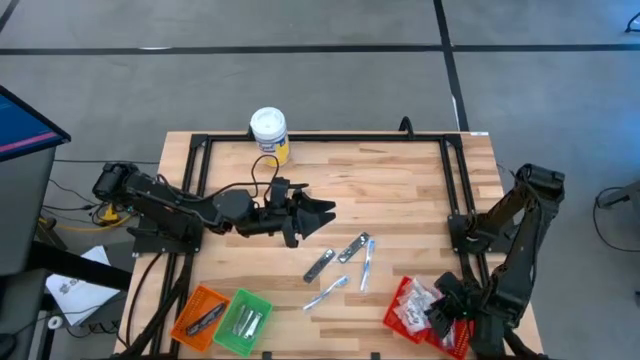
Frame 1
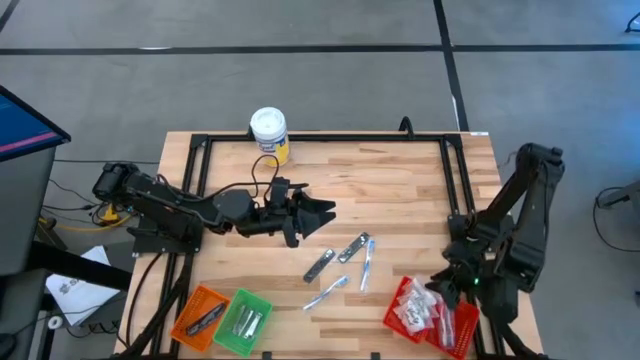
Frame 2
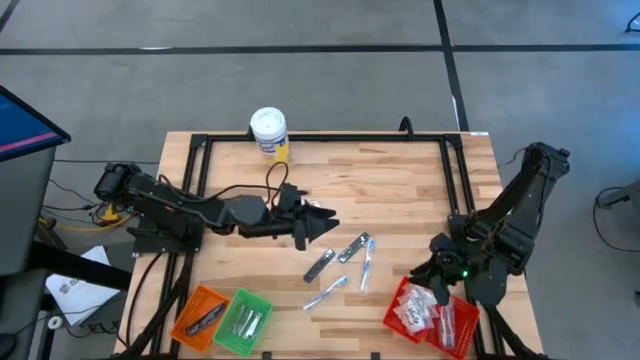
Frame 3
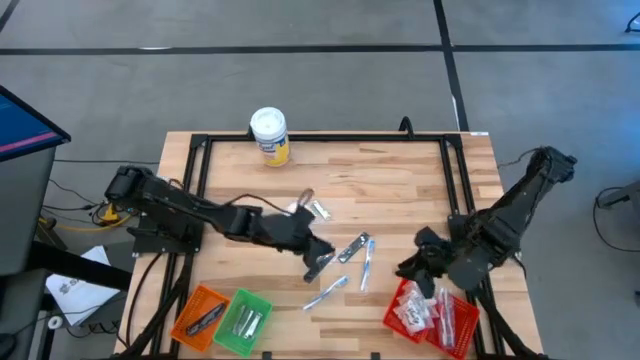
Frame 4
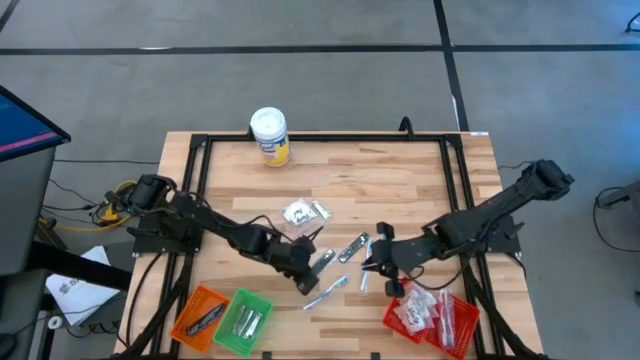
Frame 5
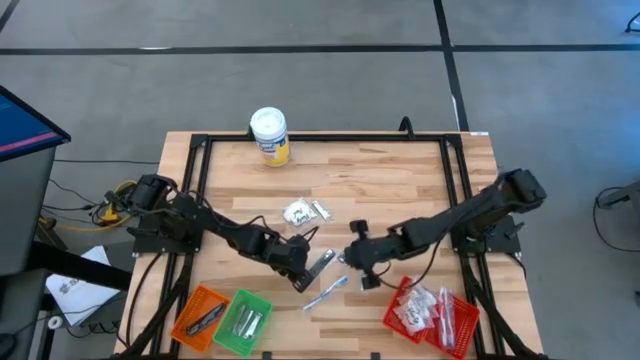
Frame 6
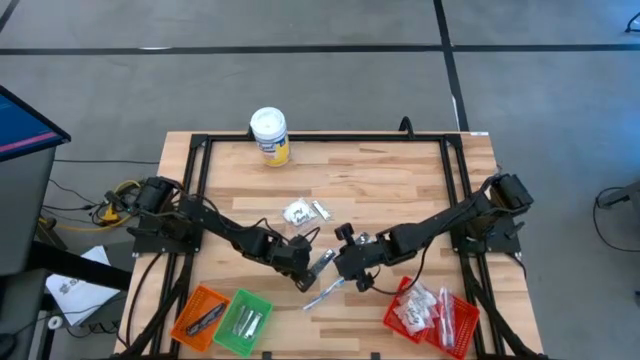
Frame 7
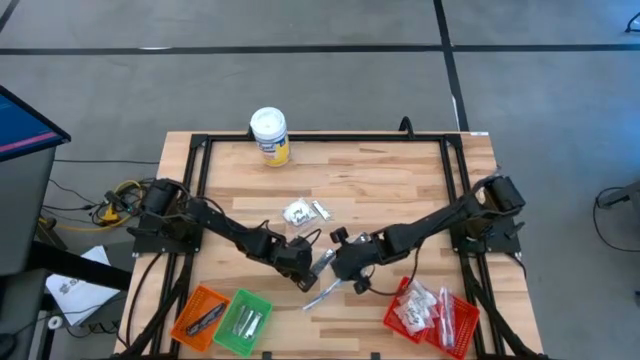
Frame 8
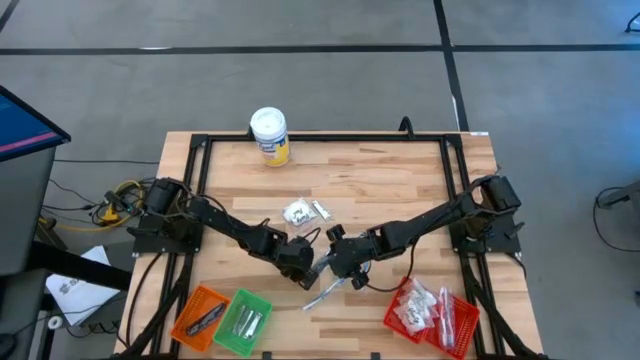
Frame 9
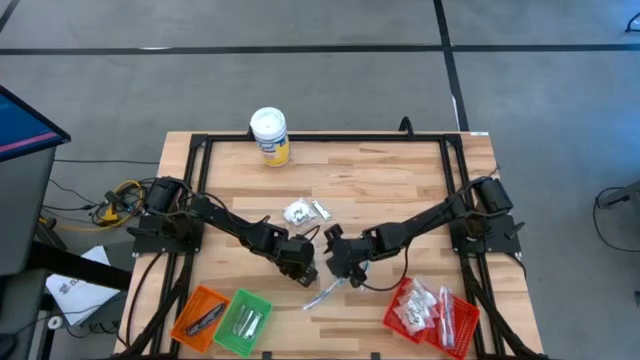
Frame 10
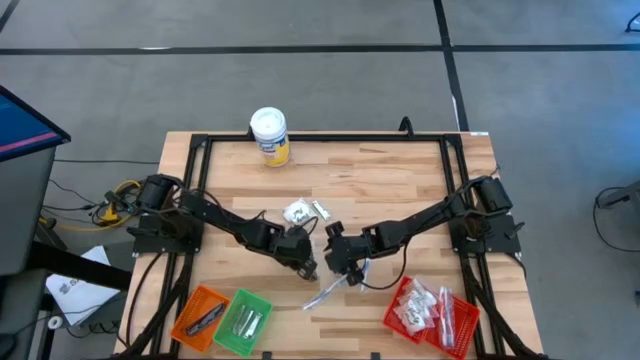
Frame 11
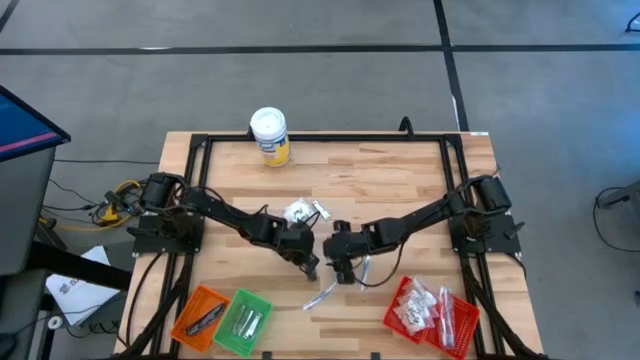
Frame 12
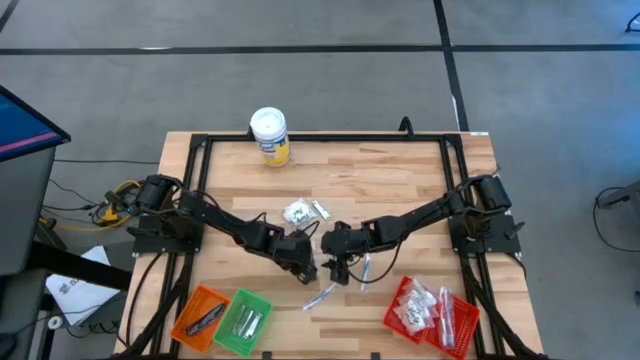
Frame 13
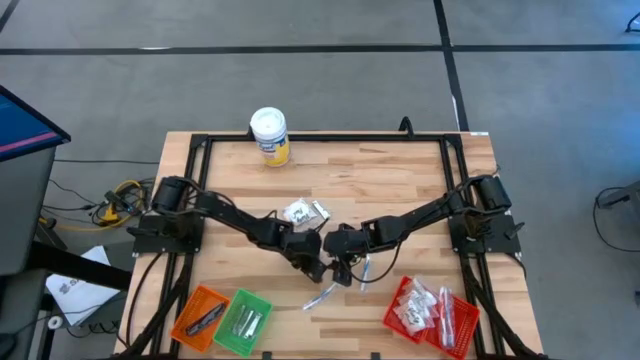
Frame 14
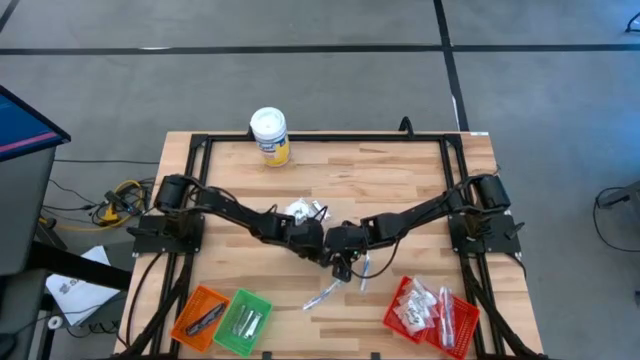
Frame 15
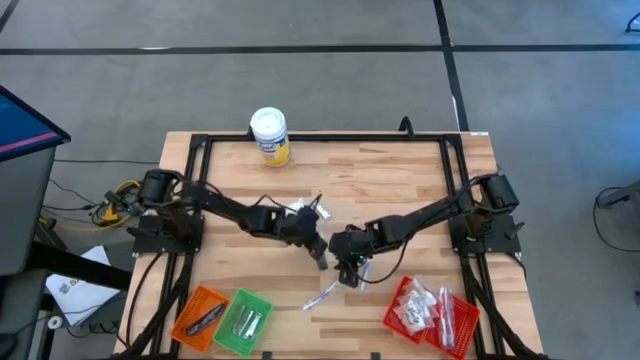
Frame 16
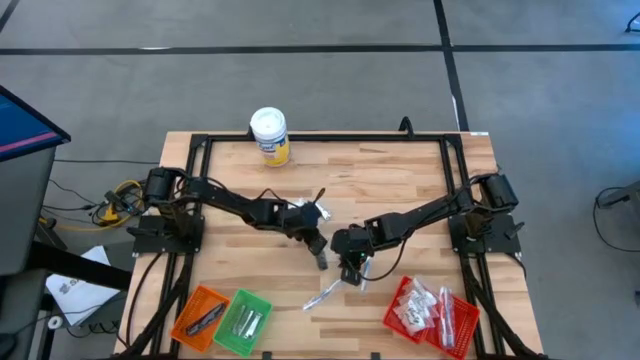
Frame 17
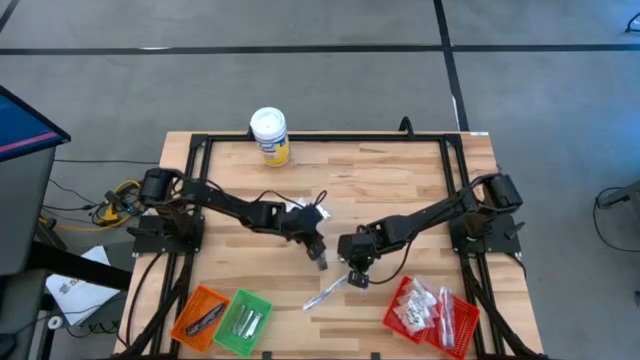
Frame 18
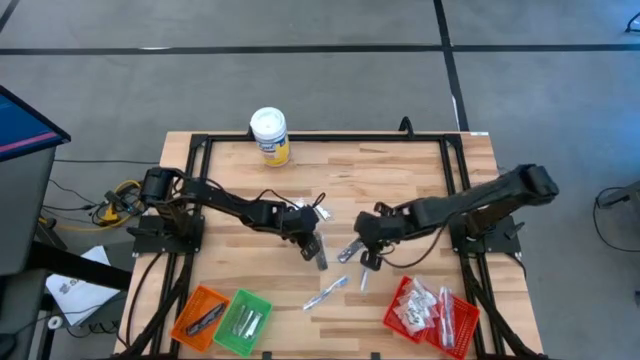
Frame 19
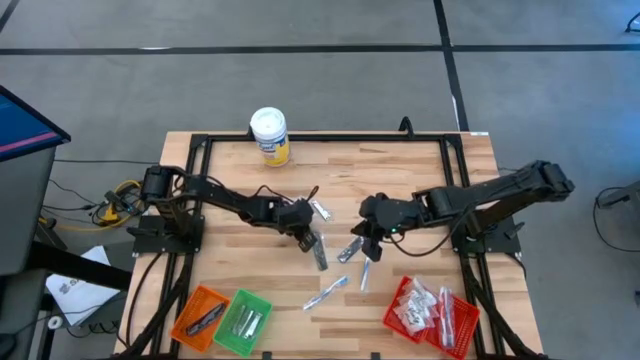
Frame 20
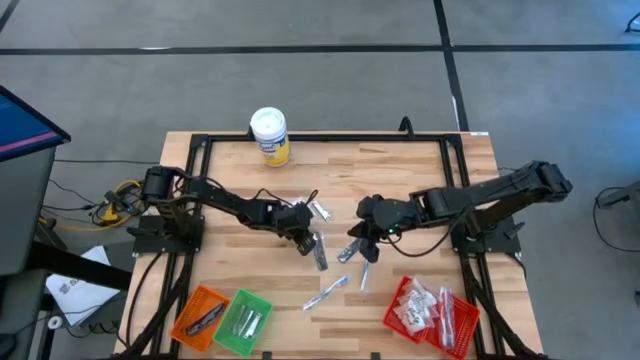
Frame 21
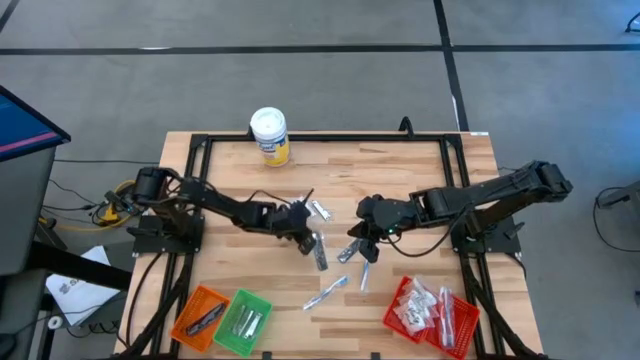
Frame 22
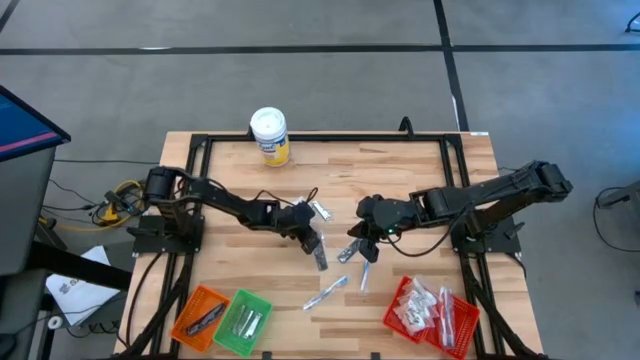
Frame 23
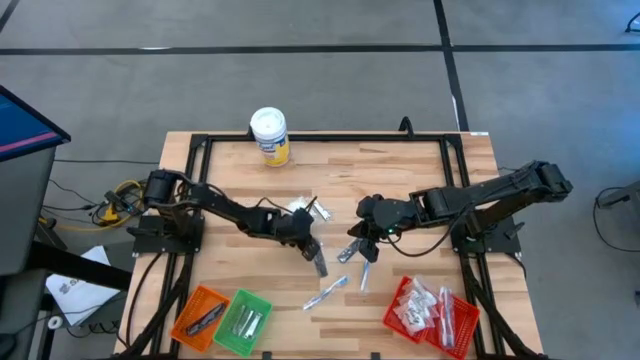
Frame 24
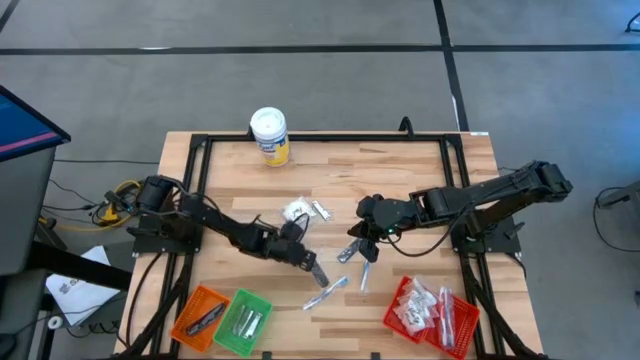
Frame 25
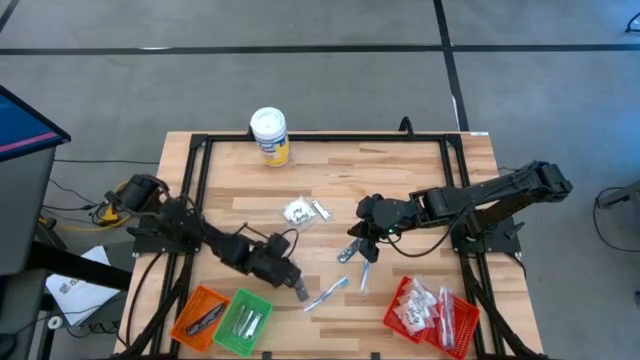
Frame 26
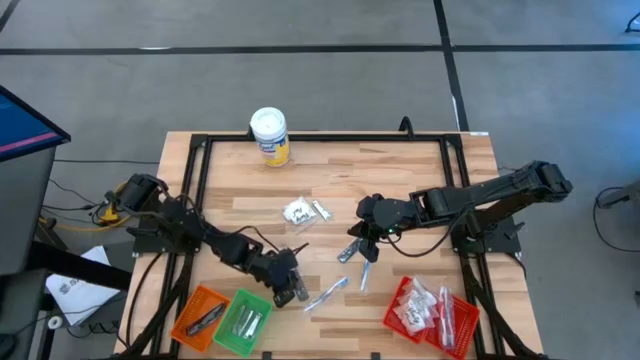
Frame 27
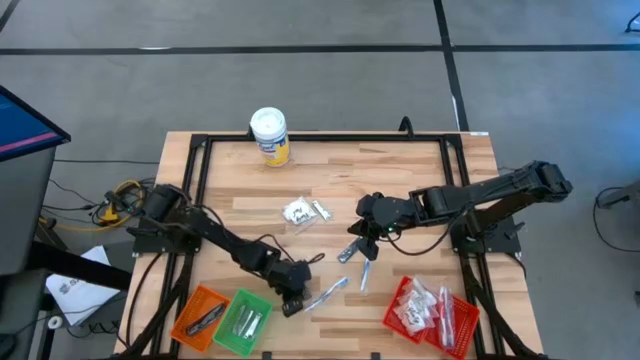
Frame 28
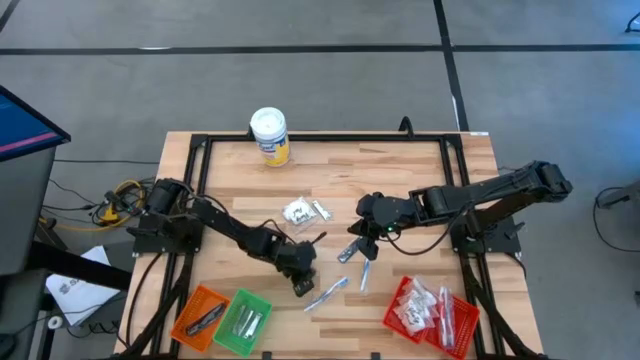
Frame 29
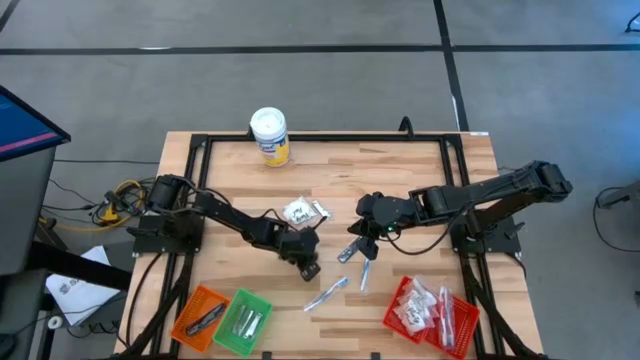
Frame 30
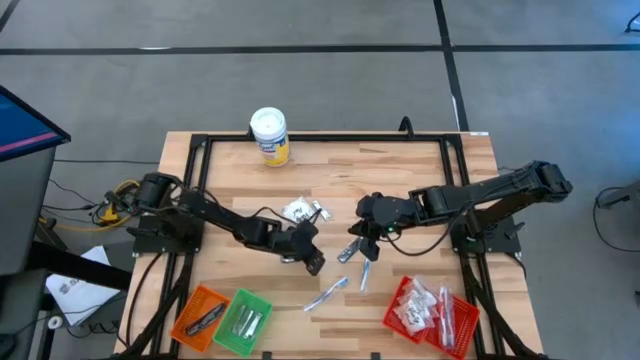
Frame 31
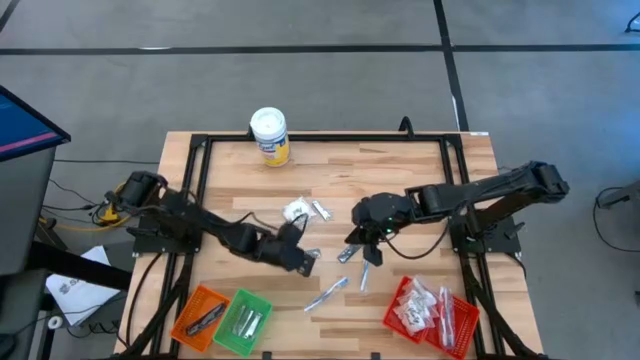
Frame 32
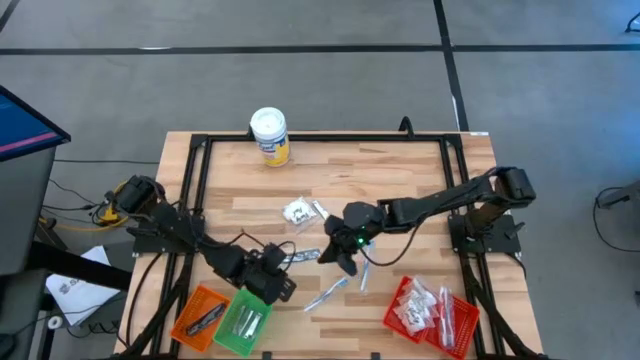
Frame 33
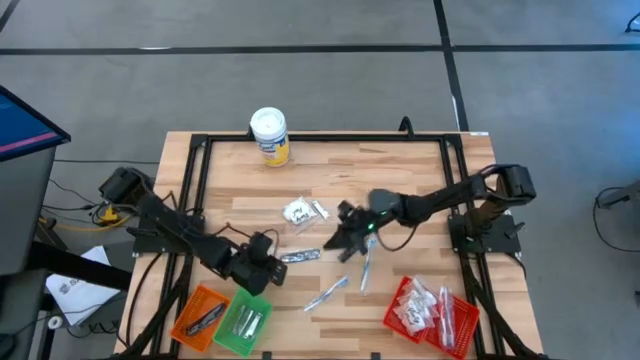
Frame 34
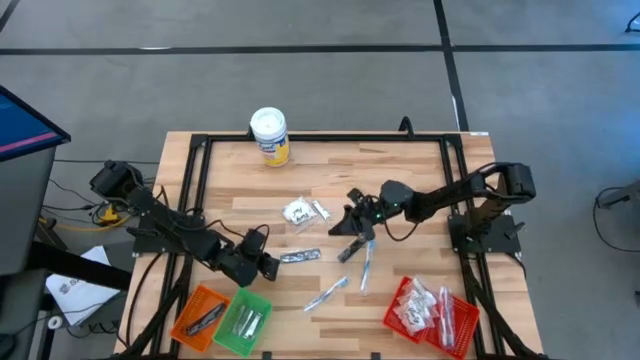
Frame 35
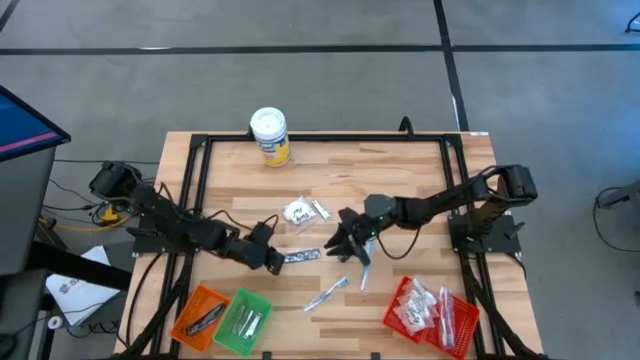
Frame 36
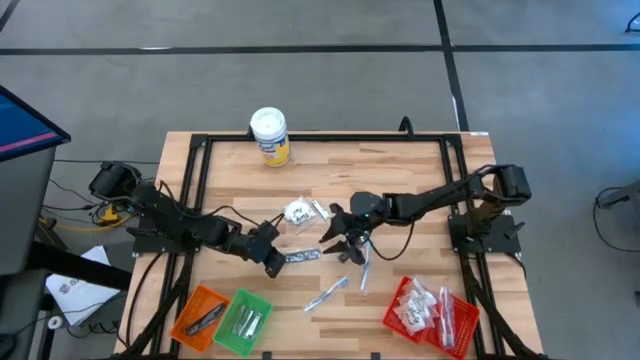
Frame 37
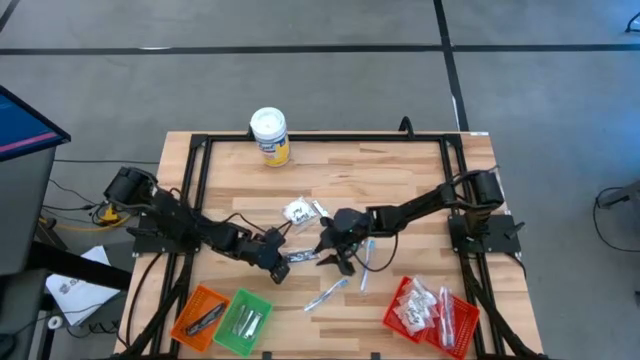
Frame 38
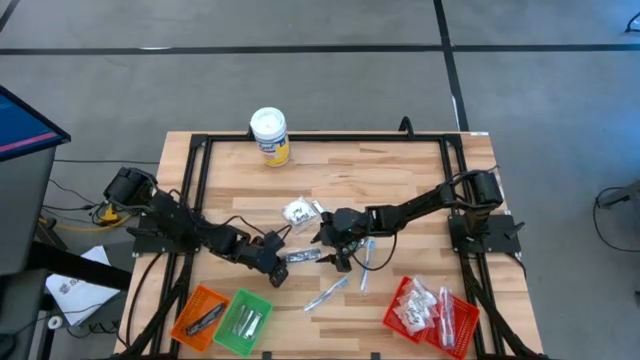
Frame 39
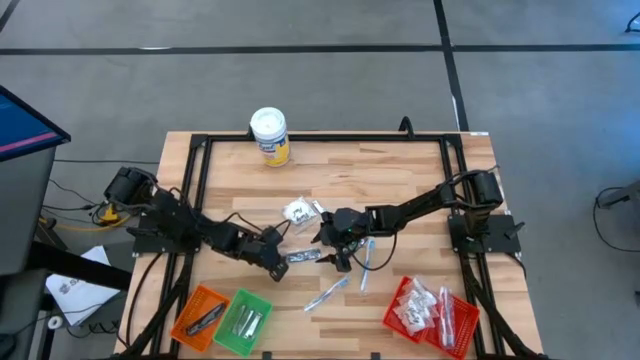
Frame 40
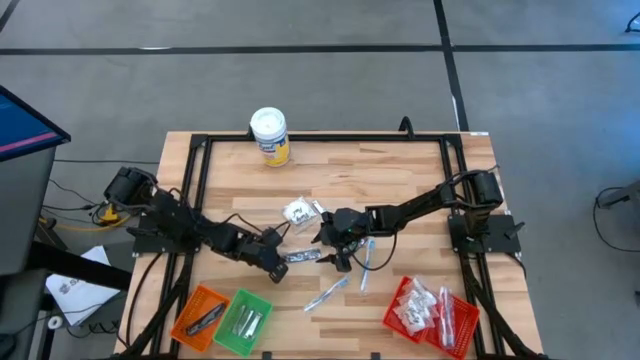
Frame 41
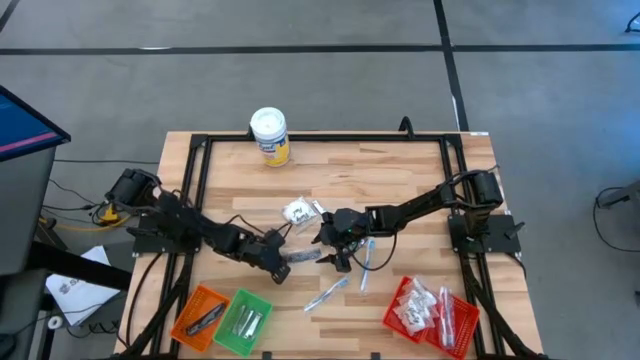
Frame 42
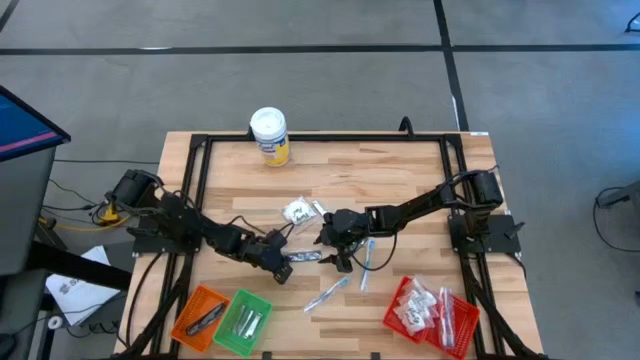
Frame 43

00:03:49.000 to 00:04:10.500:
Task: Pick & Place Travel size toiletries
Put the black comb into the orange basket
